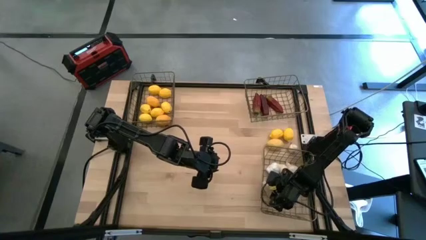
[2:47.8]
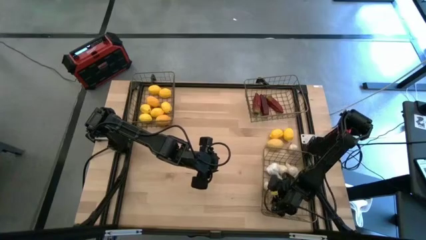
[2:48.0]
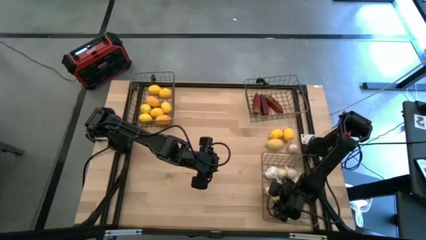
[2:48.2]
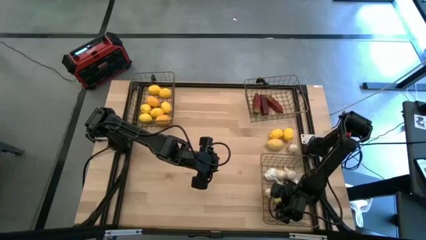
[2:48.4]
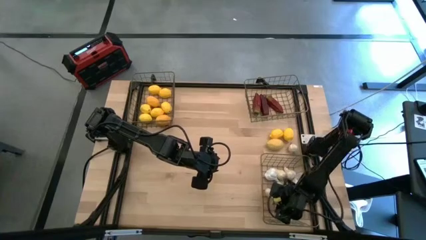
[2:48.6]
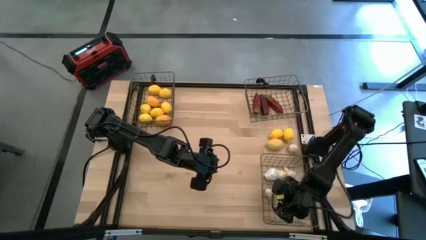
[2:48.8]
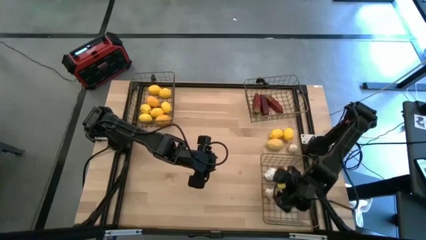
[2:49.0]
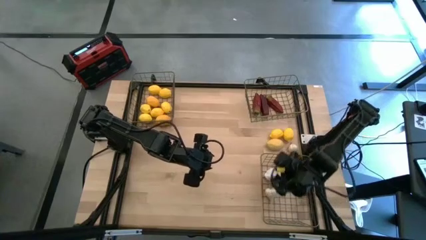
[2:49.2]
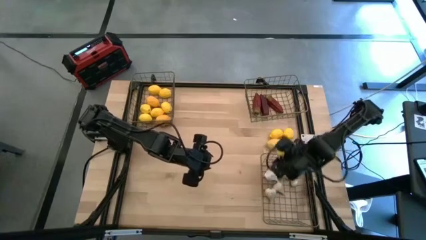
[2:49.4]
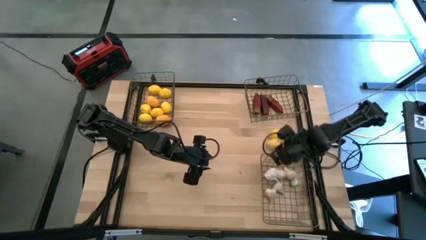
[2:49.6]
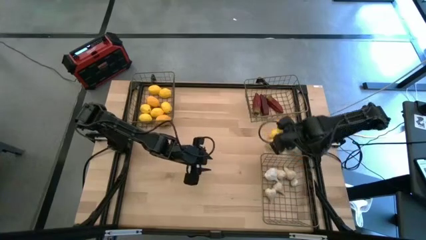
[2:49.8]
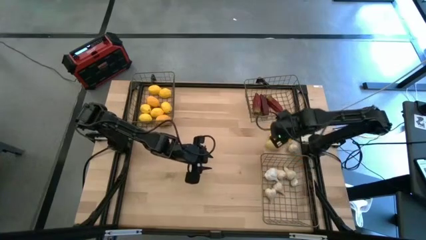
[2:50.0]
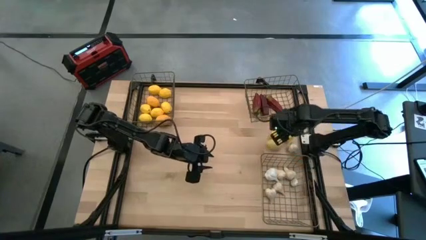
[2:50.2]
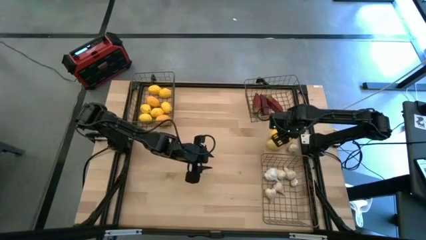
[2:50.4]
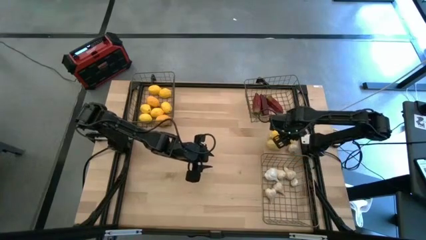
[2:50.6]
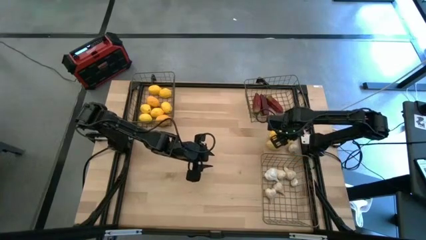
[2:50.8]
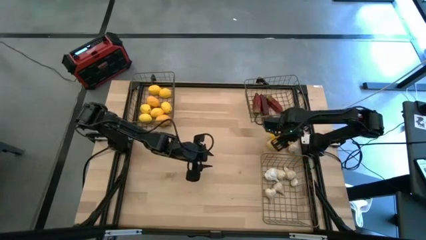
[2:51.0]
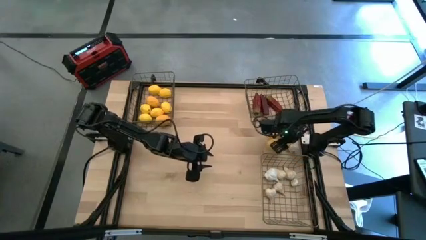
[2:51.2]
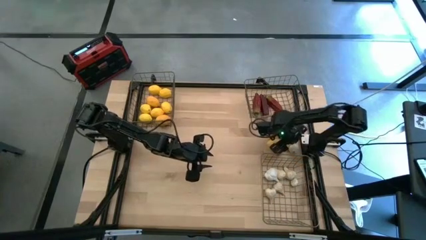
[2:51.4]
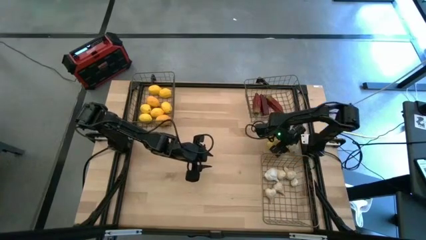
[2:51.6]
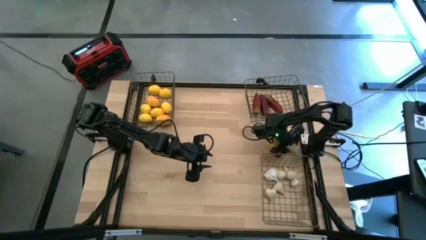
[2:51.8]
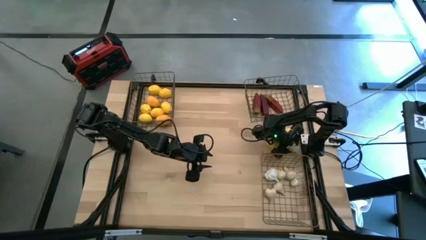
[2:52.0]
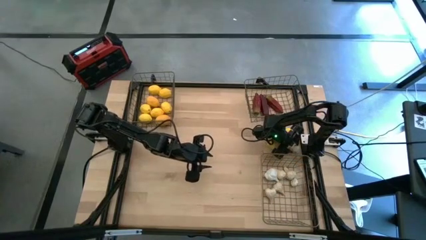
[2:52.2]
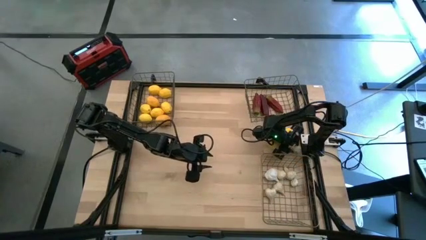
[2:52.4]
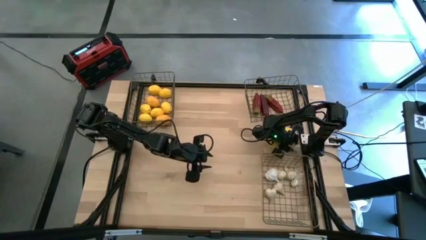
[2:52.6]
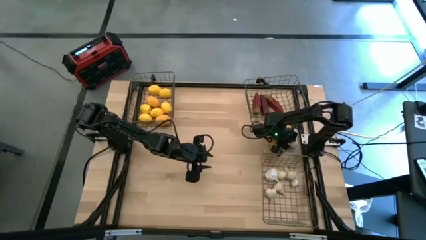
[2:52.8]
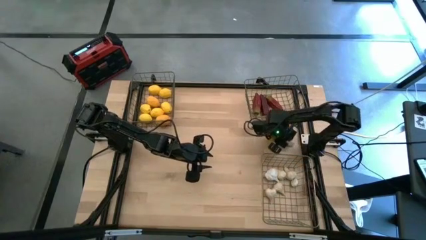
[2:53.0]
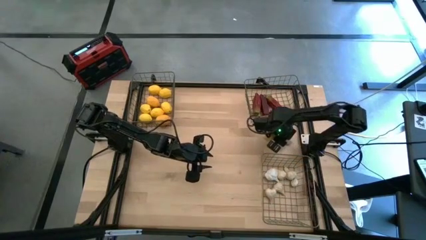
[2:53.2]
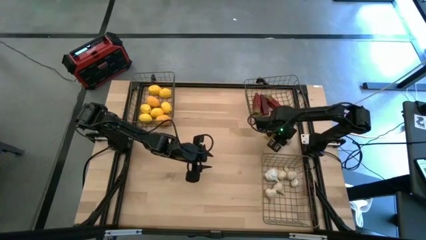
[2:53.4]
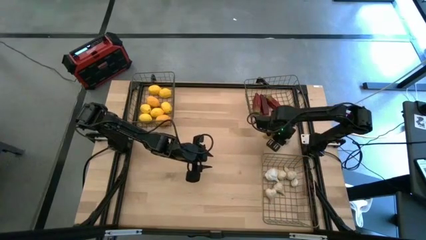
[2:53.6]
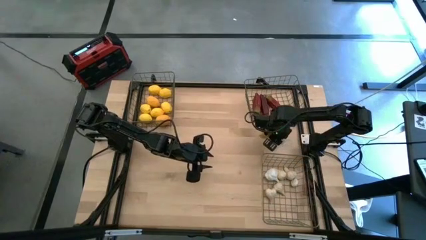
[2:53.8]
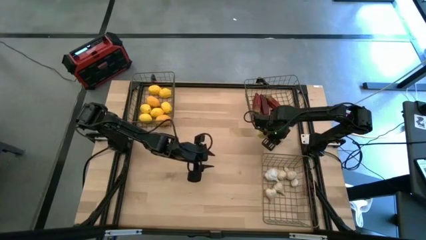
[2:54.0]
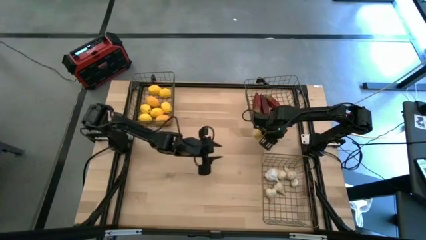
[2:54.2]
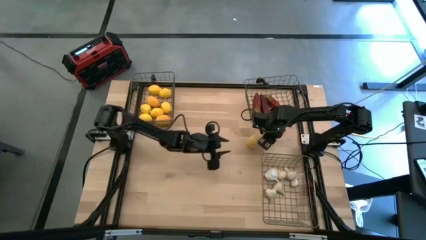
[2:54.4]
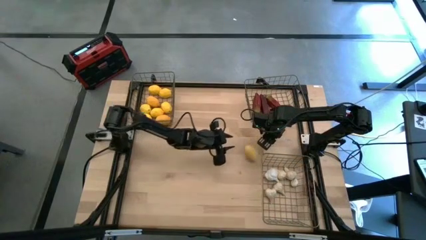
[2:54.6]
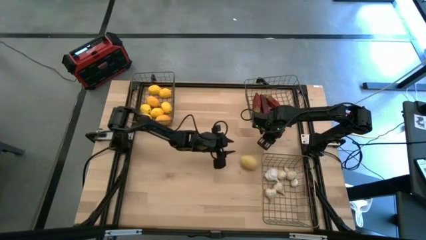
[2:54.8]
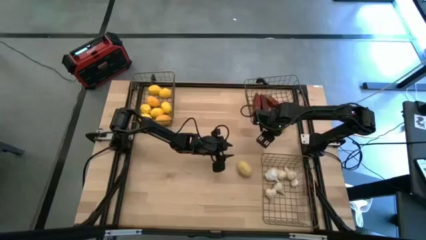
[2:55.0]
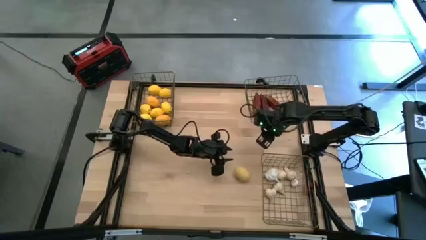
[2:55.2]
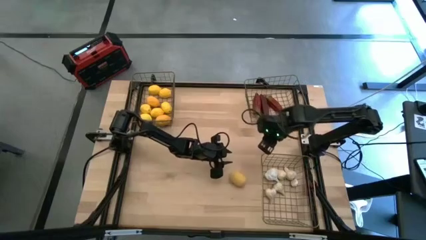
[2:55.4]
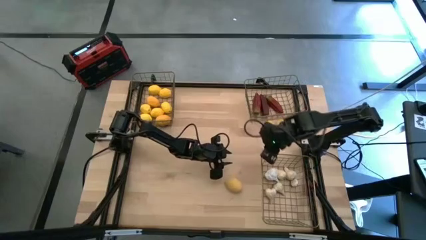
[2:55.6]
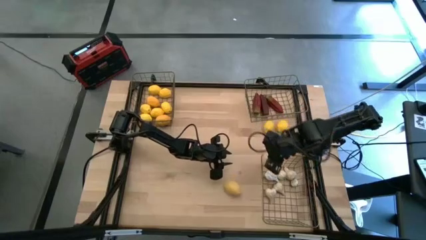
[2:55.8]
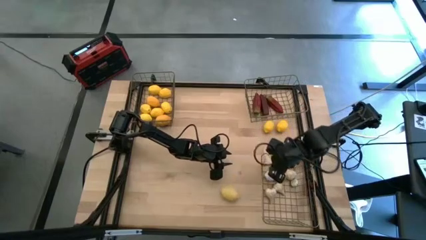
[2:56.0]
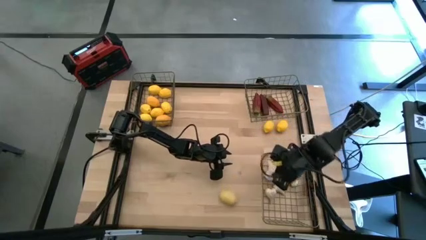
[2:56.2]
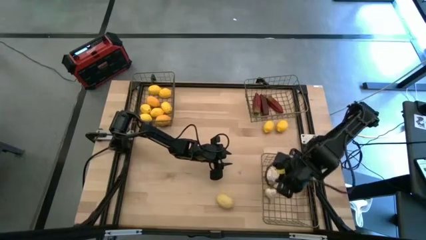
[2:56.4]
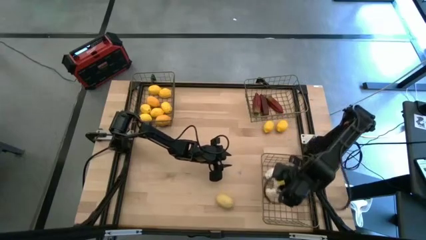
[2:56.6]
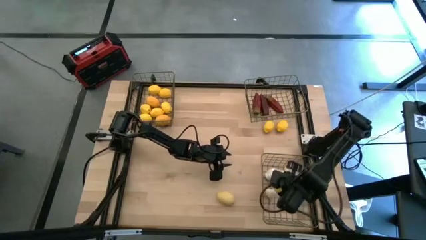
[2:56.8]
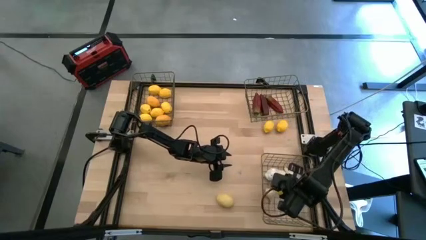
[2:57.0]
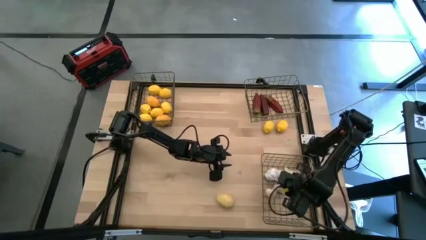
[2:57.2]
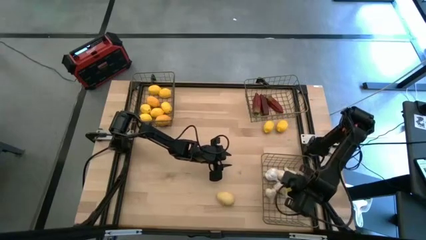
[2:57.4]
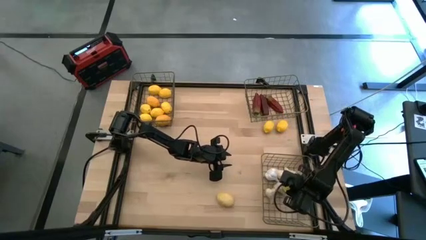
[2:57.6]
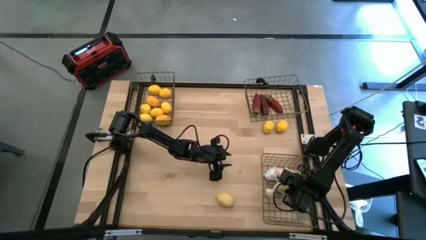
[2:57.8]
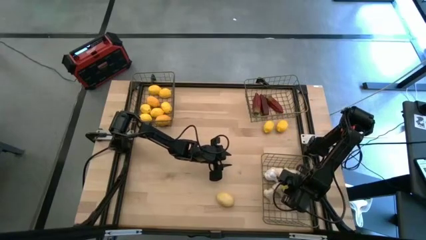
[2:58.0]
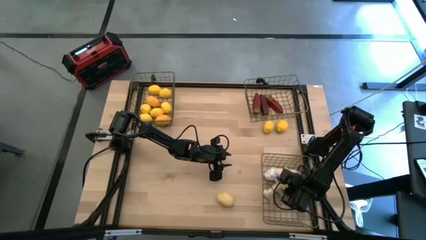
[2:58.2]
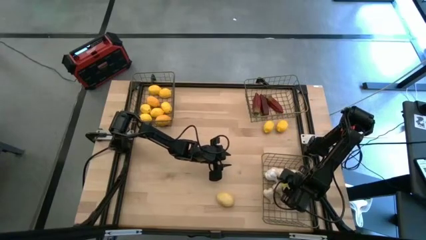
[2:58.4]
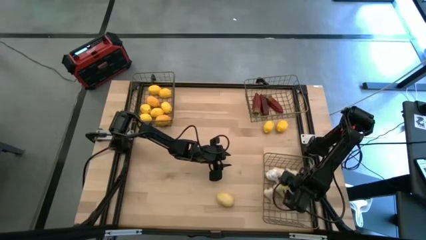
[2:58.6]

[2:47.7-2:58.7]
Task: Sort produce into baskets
Put the white garlic into the bottom wire basket

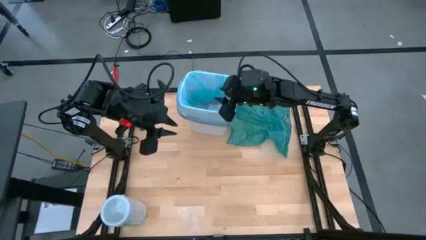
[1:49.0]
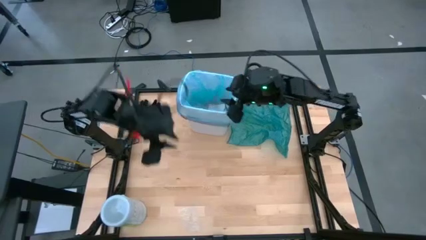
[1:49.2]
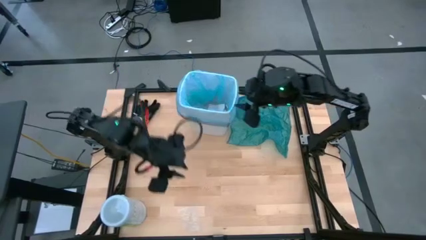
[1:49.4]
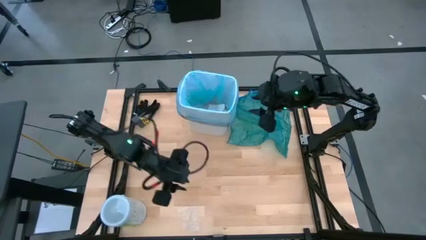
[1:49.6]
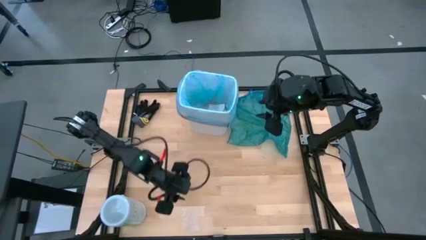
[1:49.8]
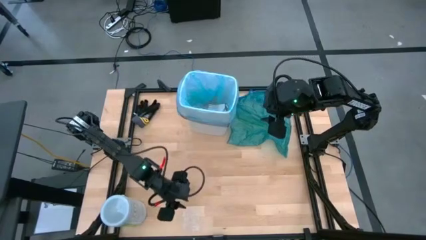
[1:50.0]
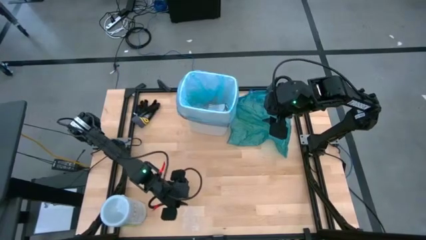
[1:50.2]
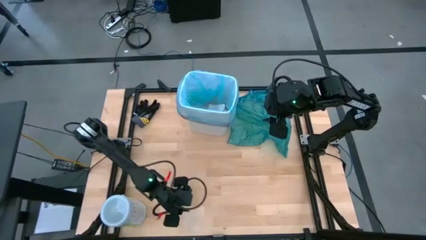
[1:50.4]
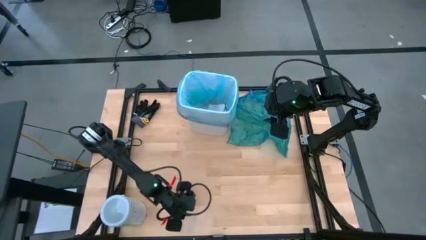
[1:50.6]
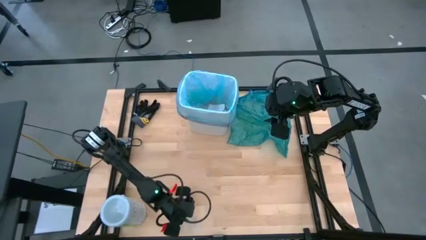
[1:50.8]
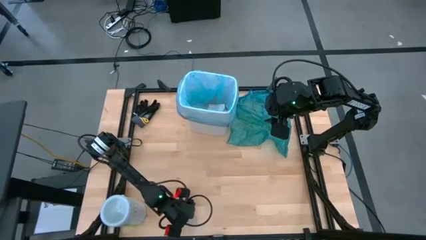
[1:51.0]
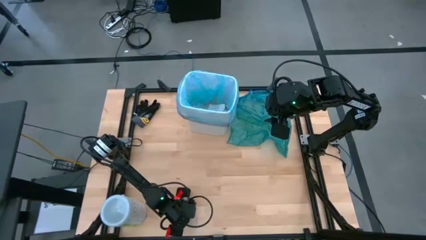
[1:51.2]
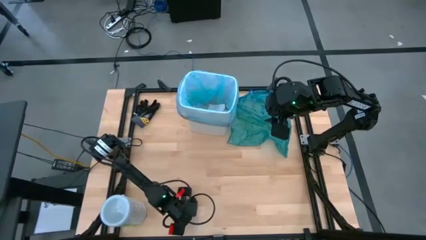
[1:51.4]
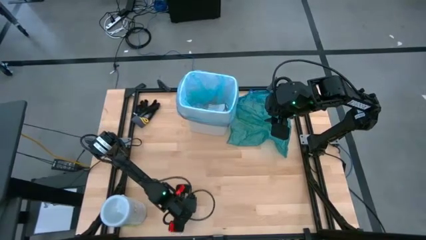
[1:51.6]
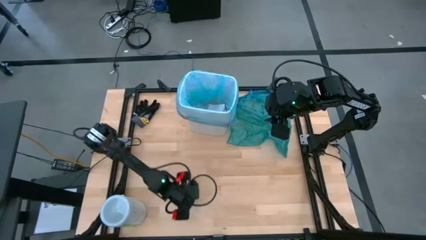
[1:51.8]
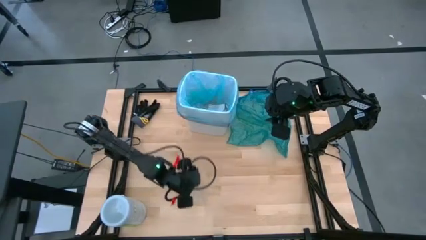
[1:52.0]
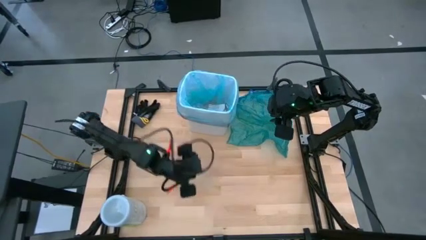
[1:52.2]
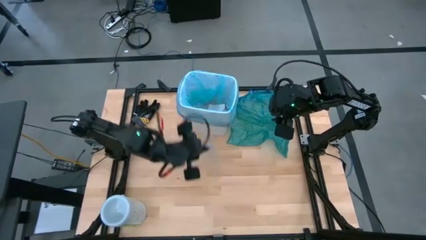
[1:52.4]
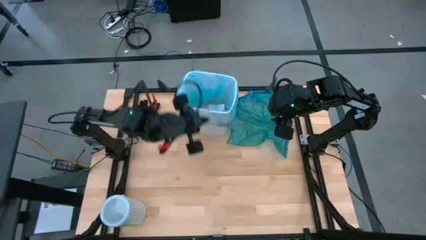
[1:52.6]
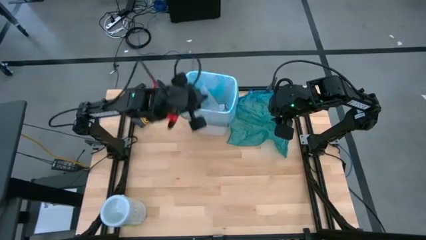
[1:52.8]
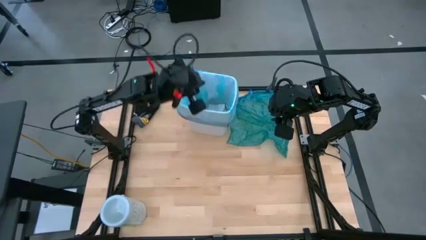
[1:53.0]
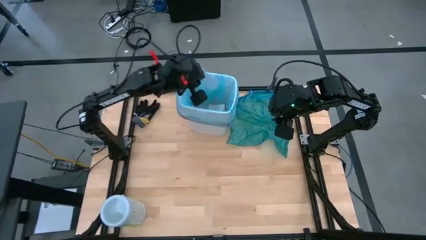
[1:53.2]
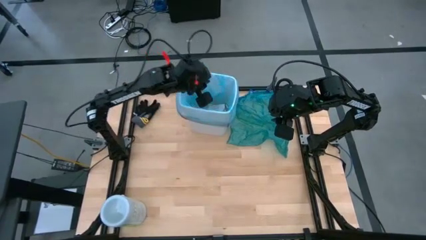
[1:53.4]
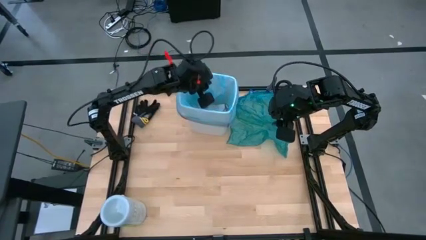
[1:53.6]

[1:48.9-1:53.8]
Task: place trash/remove bag and relplace
Put the transparent plastic into the trash bin

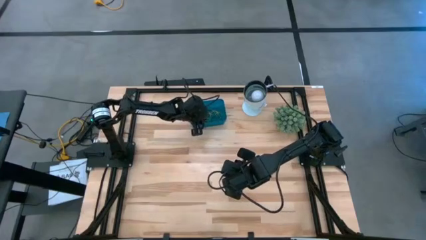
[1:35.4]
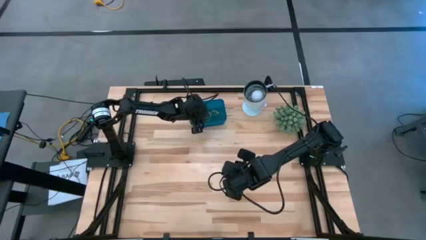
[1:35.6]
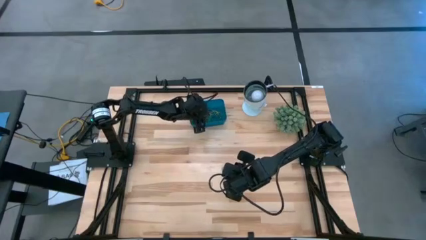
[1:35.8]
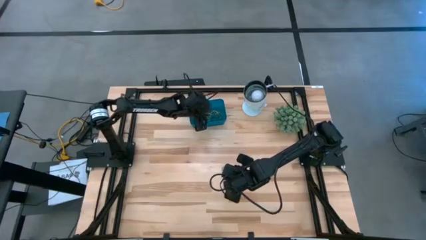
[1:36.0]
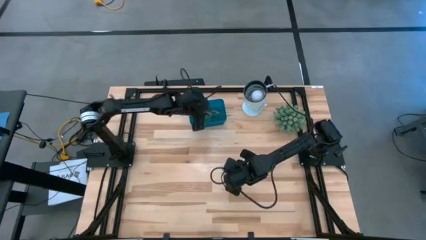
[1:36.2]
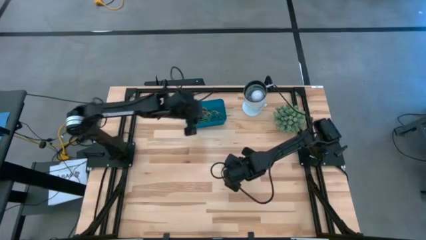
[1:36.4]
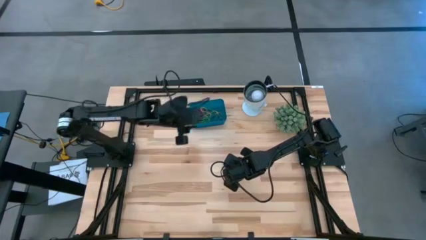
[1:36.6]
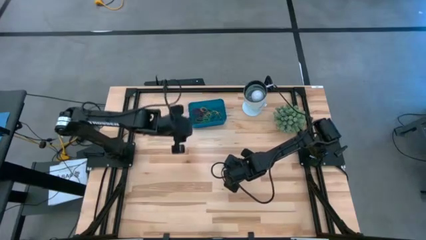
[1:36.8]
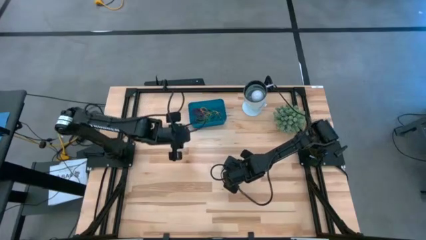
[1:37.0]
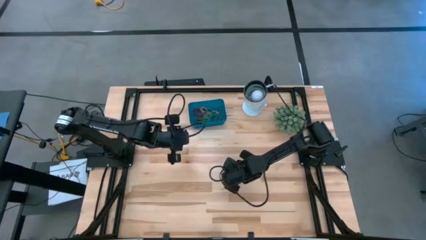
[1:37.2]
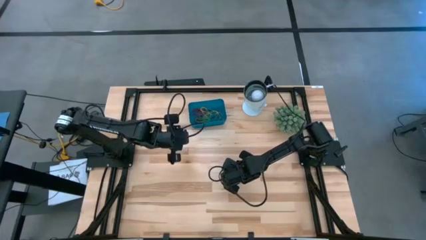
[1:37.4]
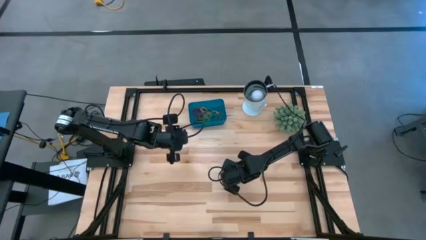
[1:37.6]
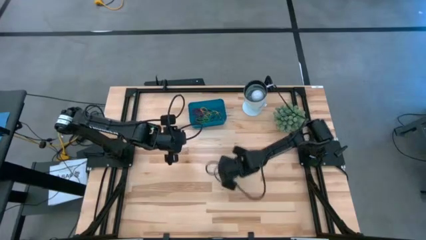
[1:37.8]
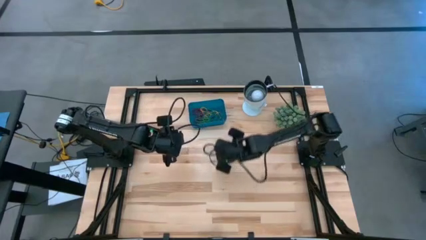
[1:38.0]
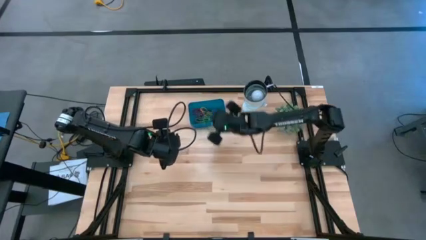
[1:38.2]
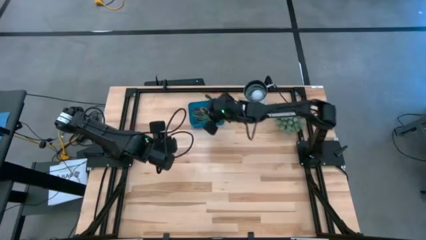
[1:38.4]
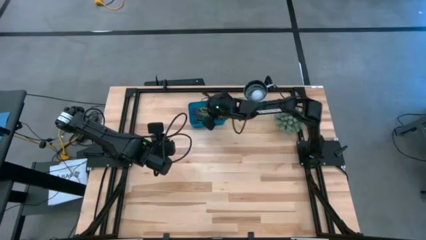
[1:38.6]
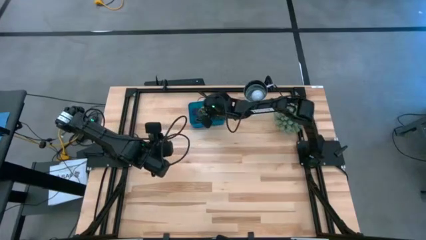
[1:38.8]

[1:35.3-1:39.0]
Task: Pick and place items into bin
Put the green rubber band into the blue bin
